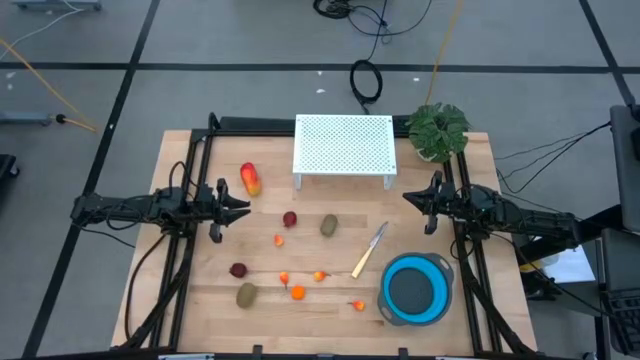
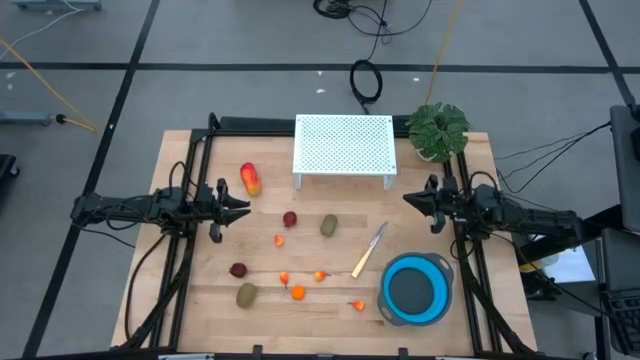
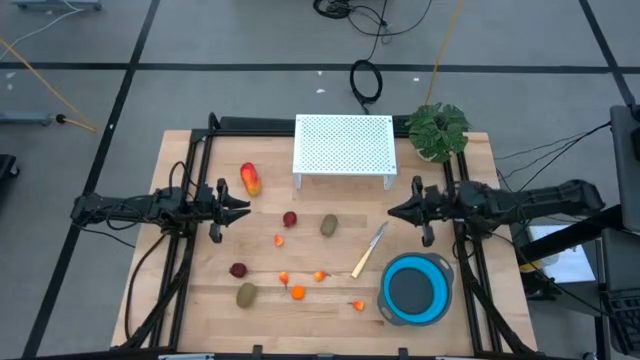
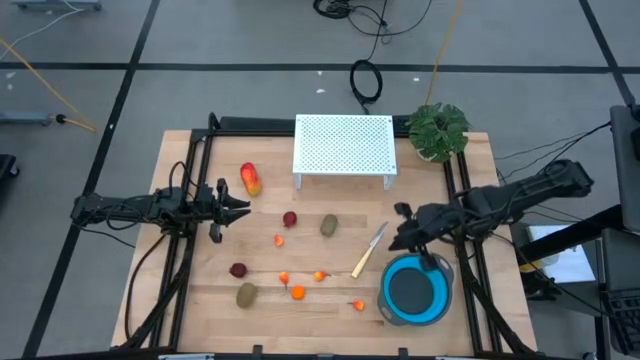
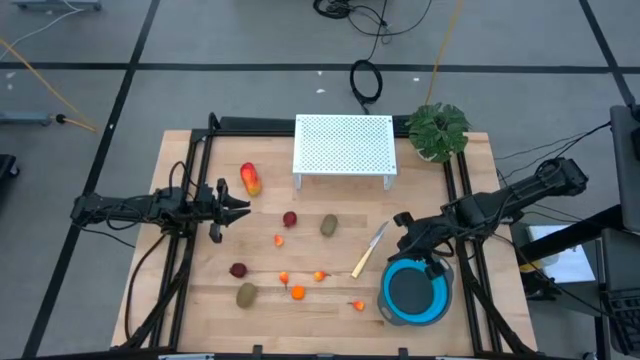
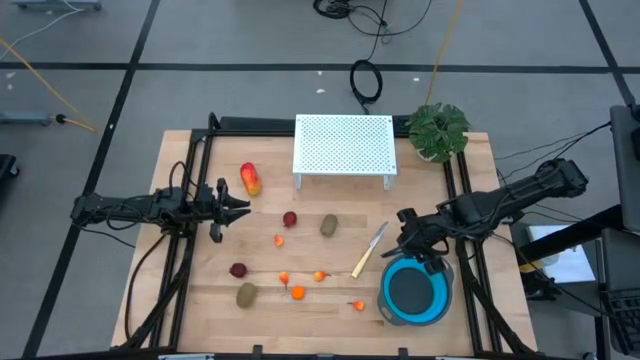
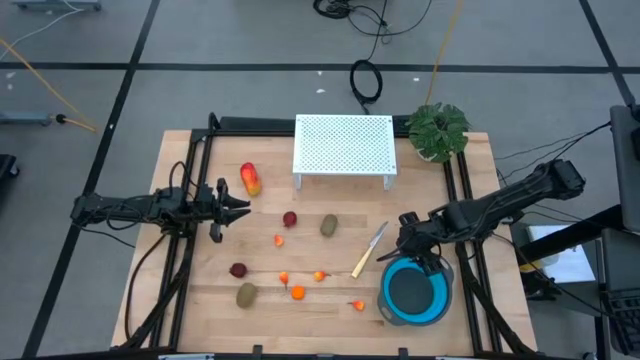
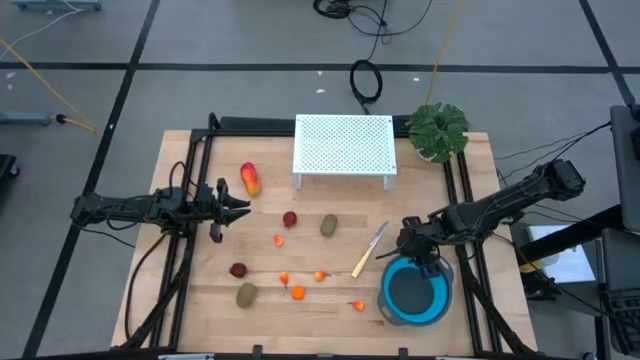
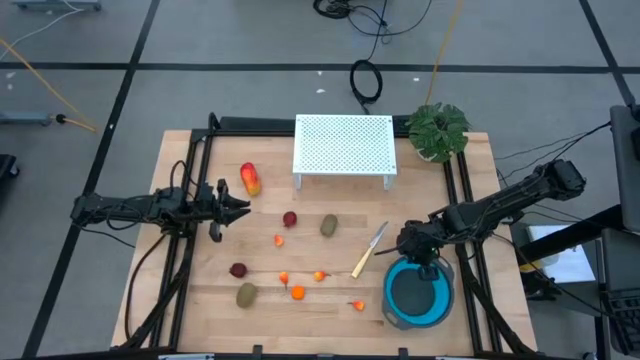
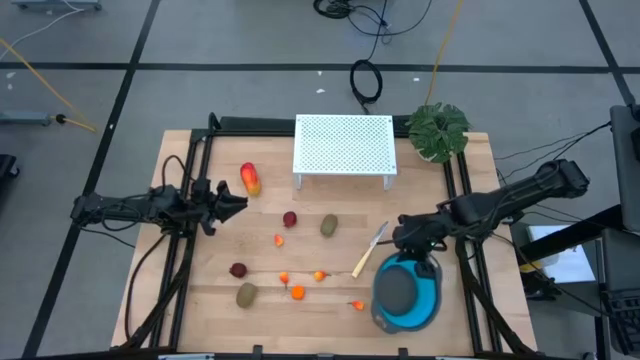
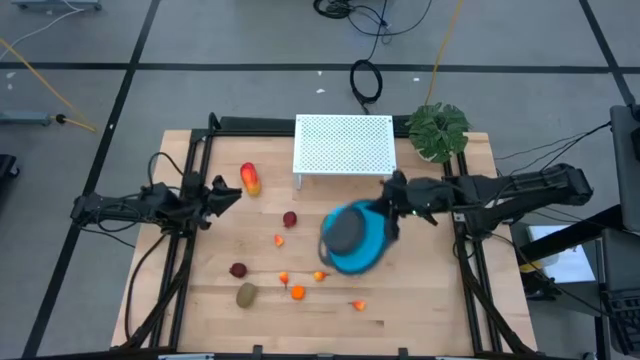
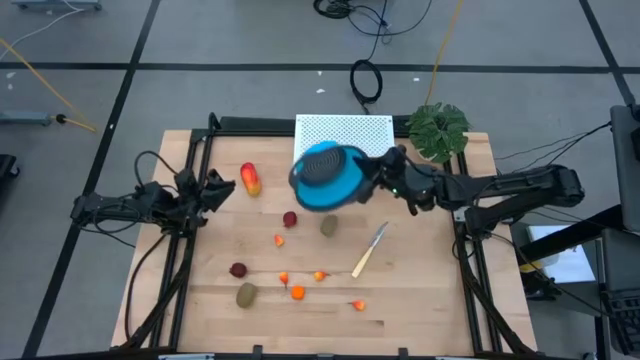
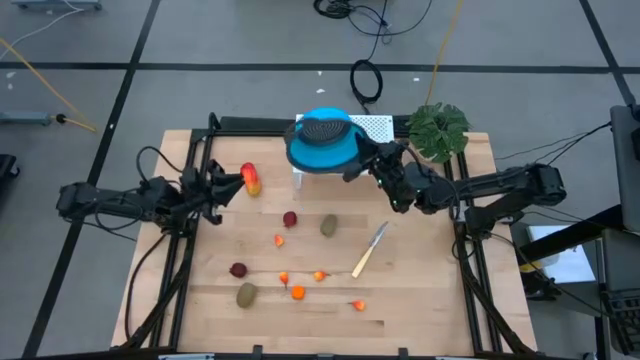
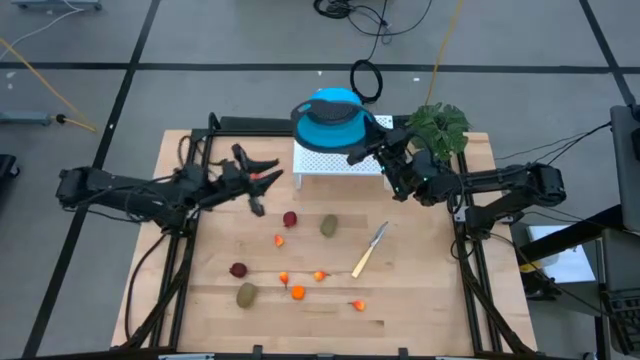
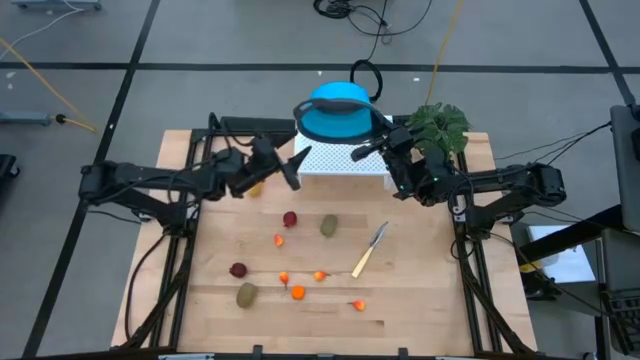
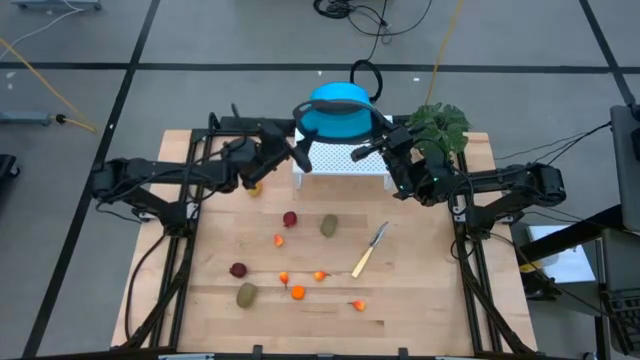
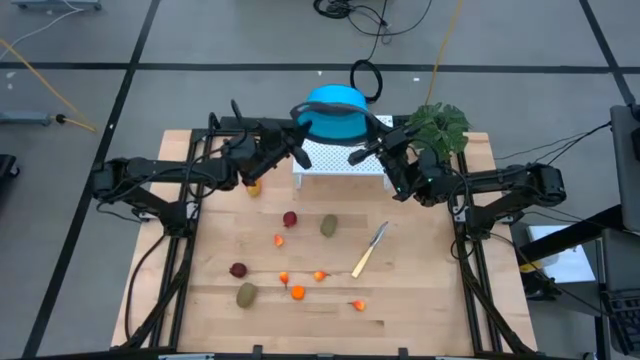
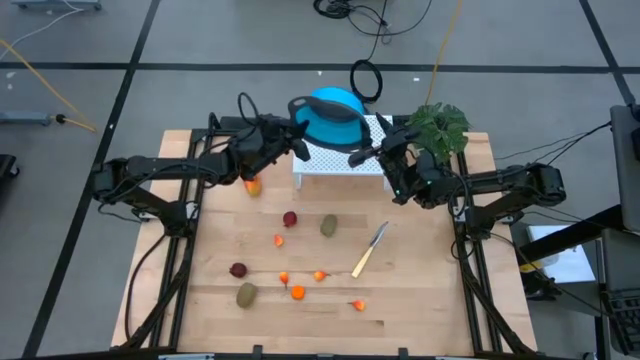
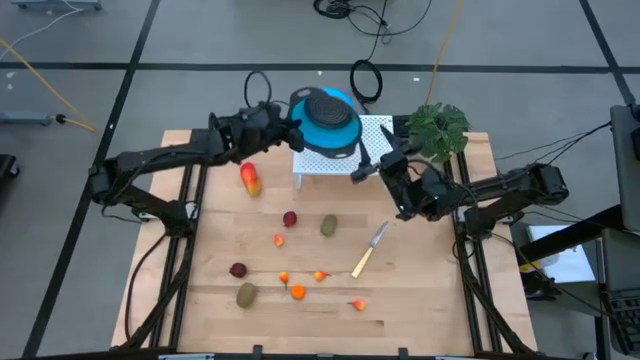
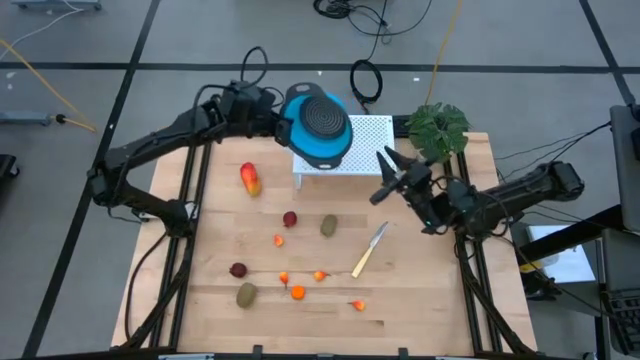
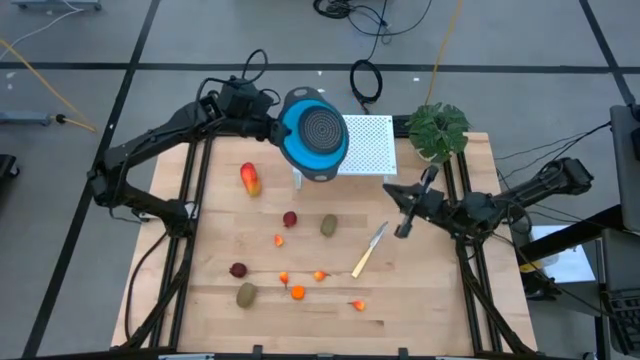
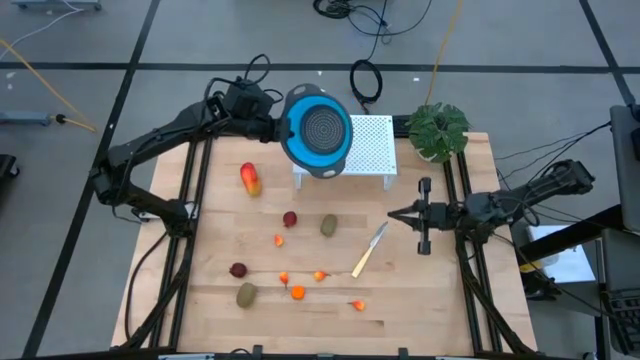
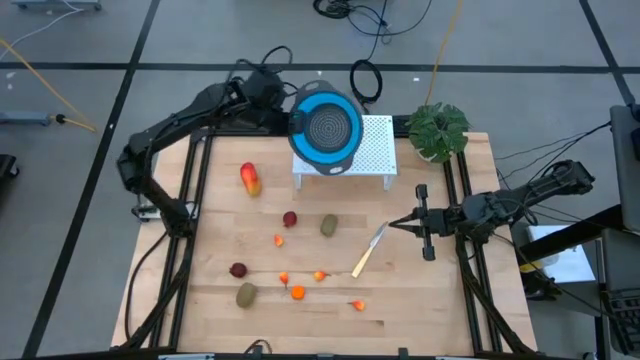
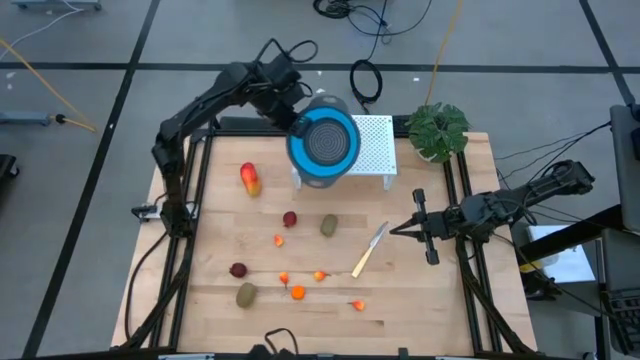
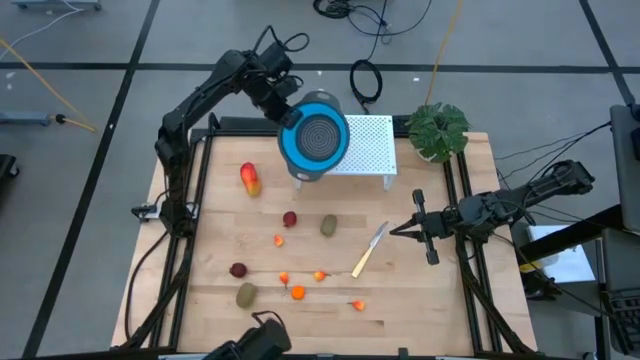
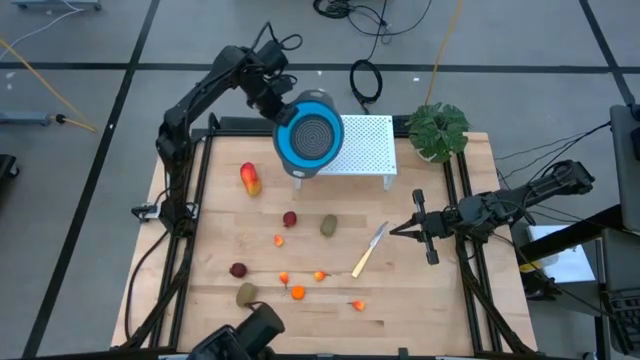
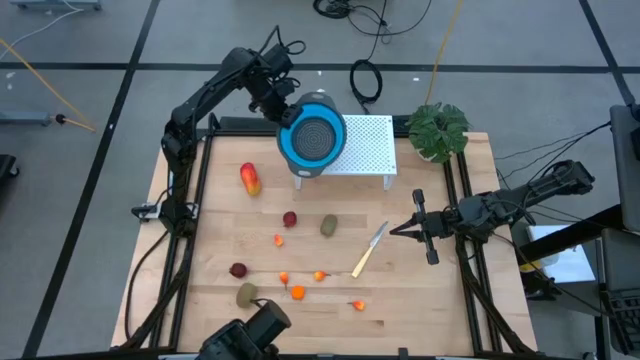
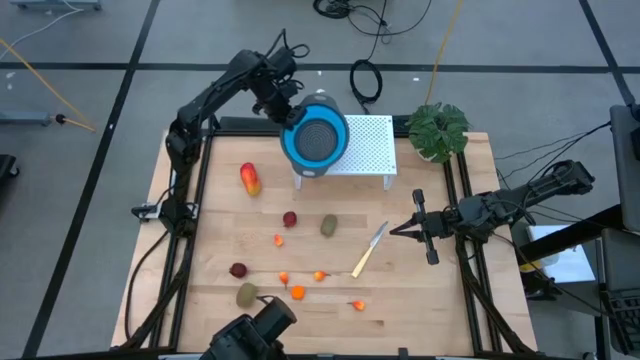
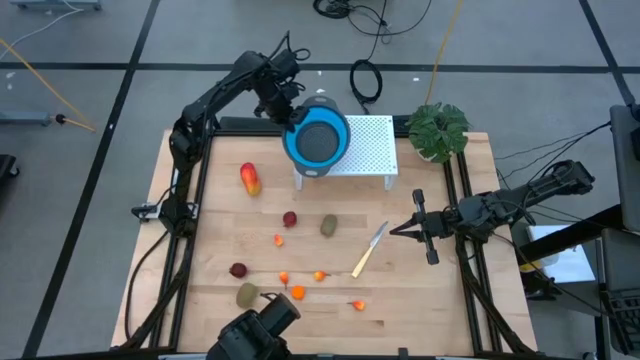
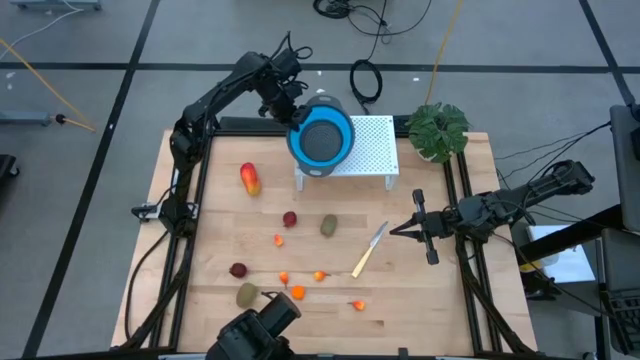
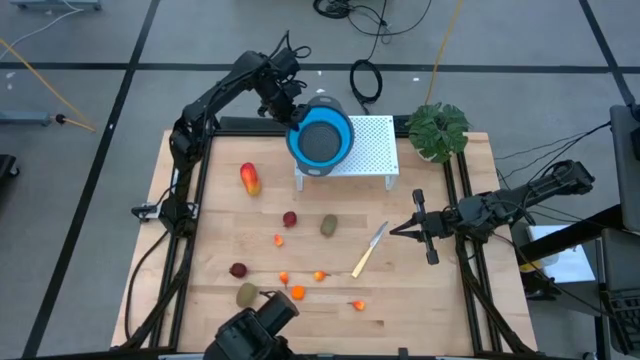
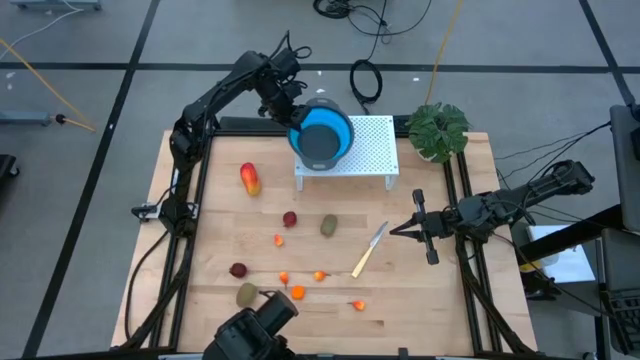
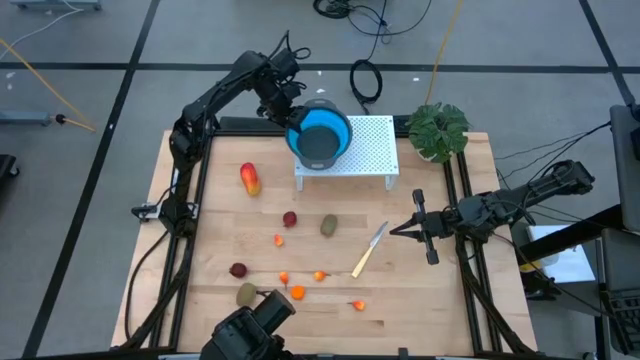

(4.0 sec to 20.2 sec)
Task: Pick & Place Fruit
Put the blue strainer bowl on the shelf
